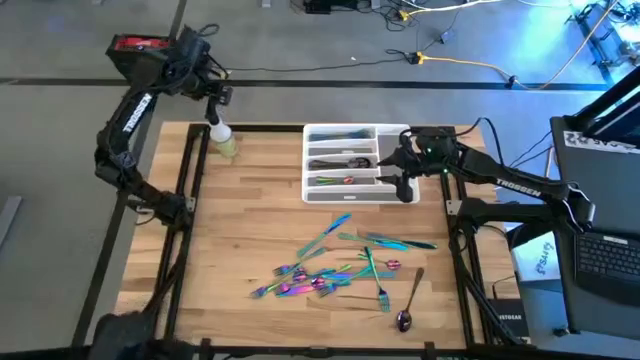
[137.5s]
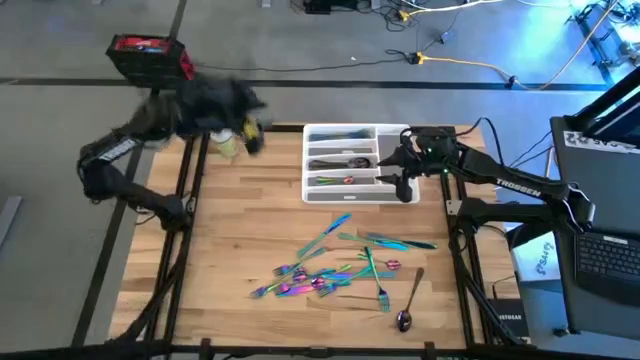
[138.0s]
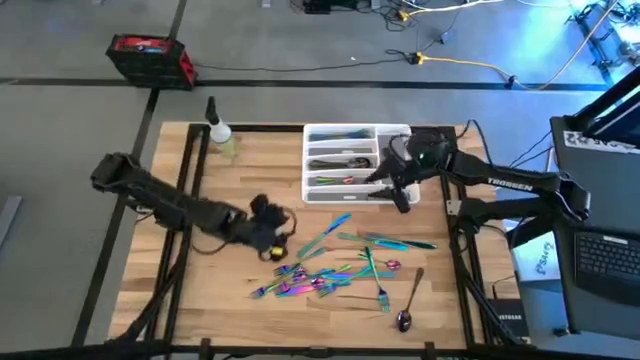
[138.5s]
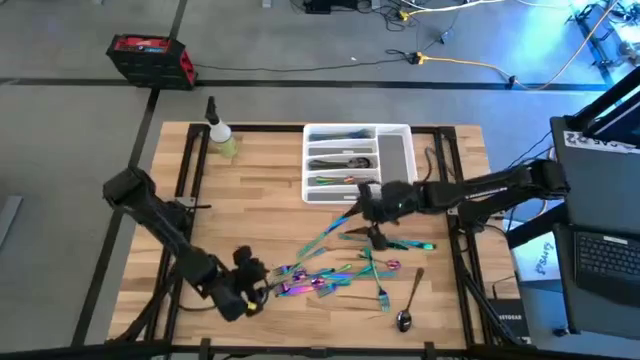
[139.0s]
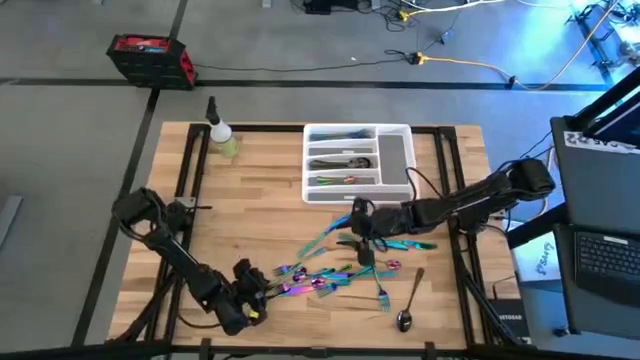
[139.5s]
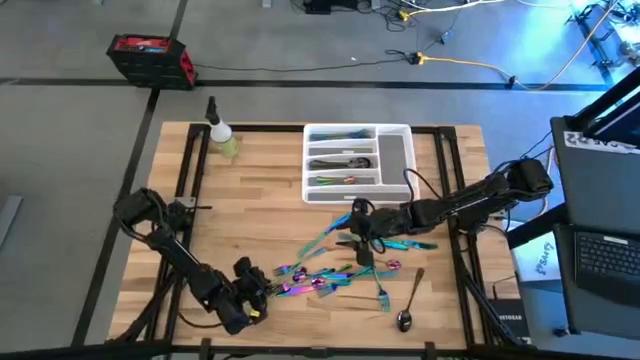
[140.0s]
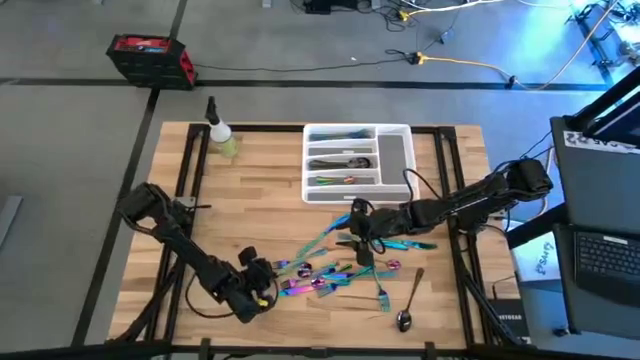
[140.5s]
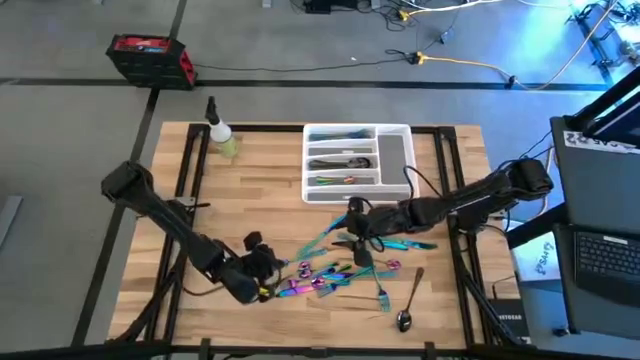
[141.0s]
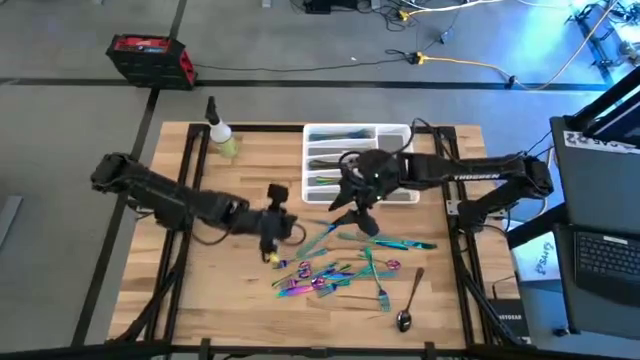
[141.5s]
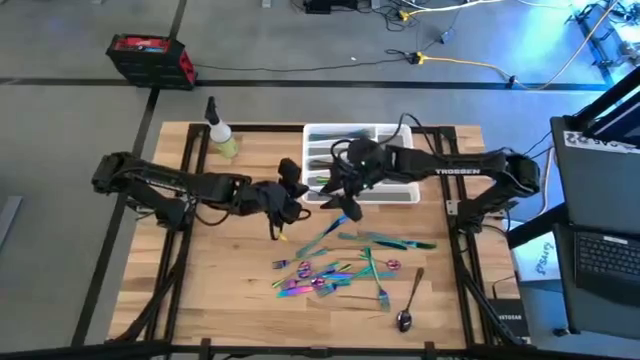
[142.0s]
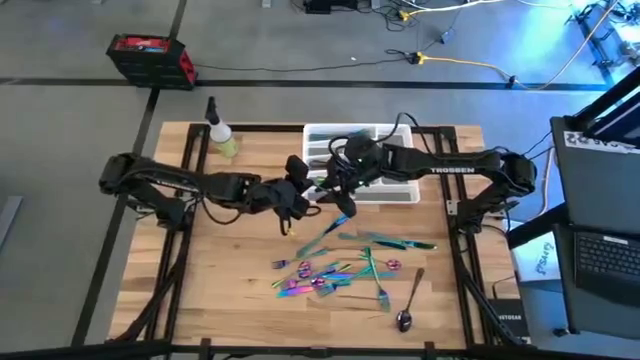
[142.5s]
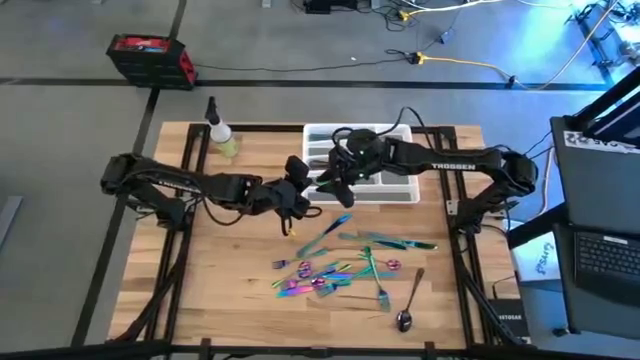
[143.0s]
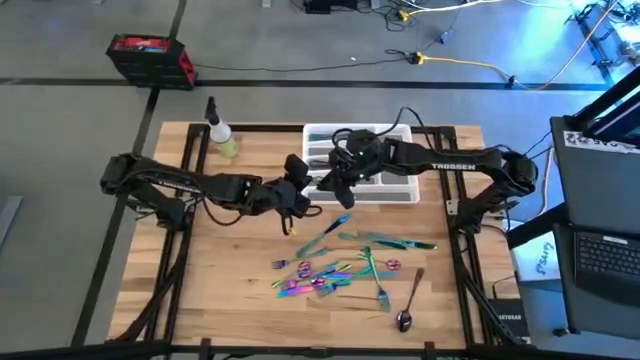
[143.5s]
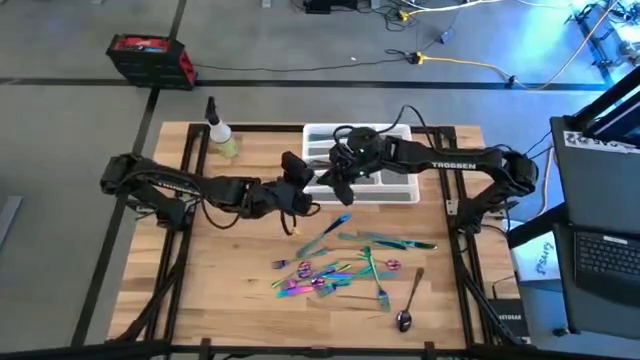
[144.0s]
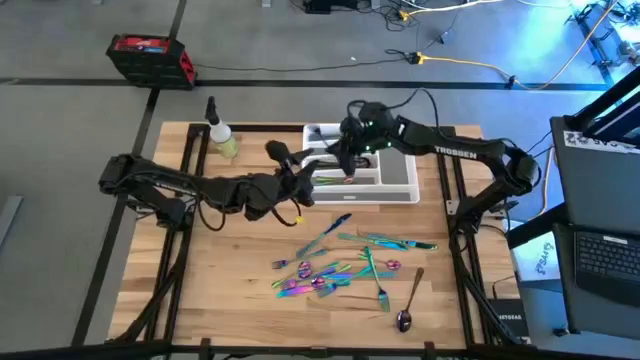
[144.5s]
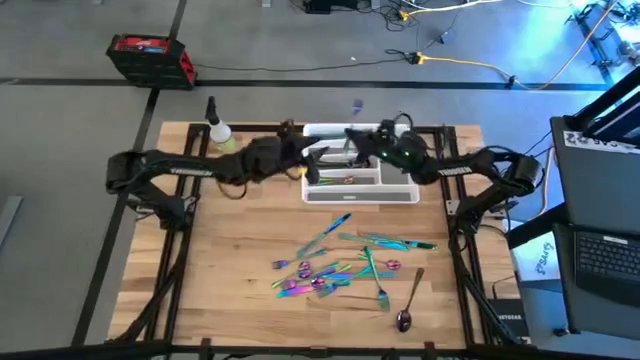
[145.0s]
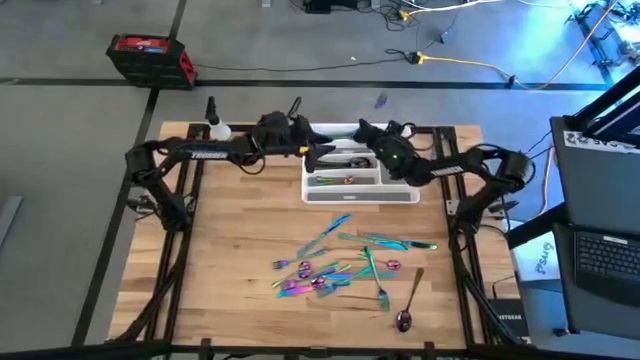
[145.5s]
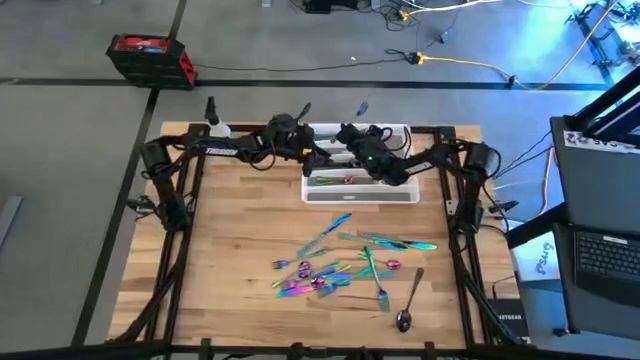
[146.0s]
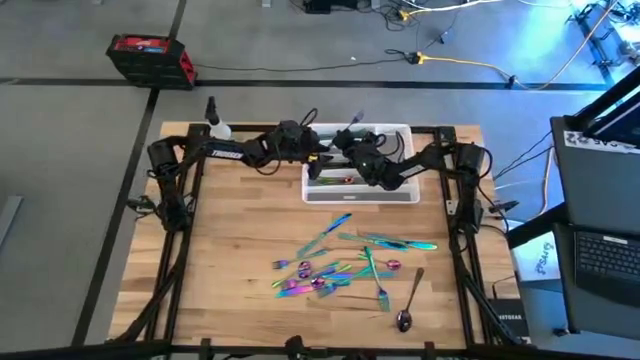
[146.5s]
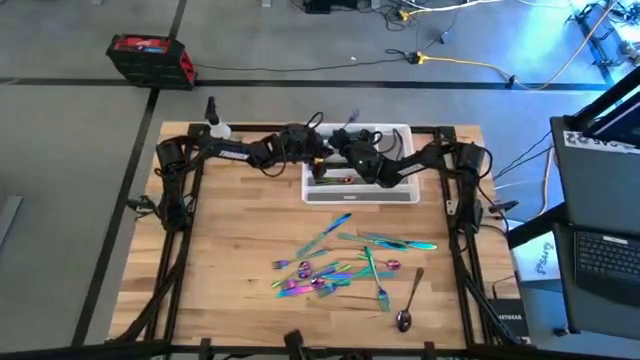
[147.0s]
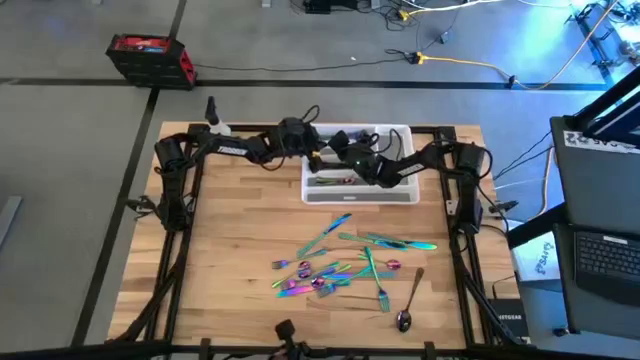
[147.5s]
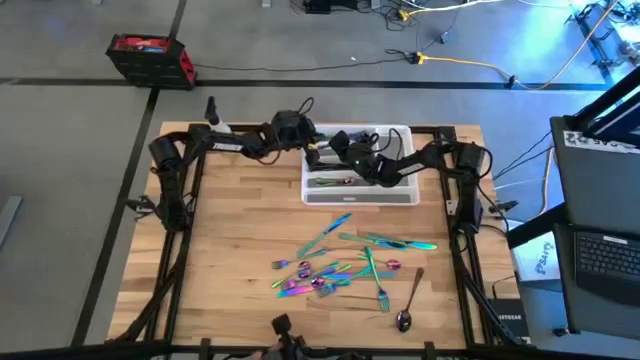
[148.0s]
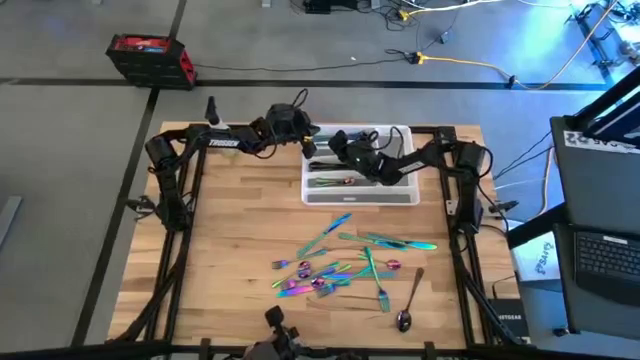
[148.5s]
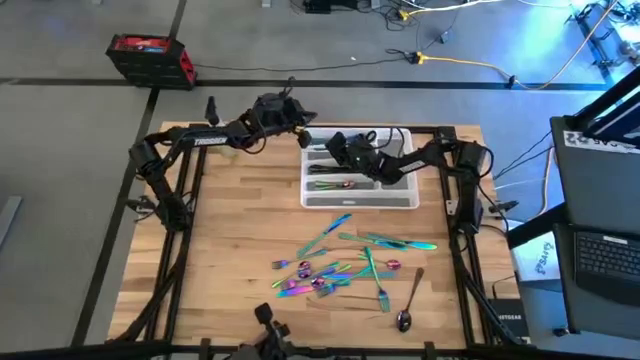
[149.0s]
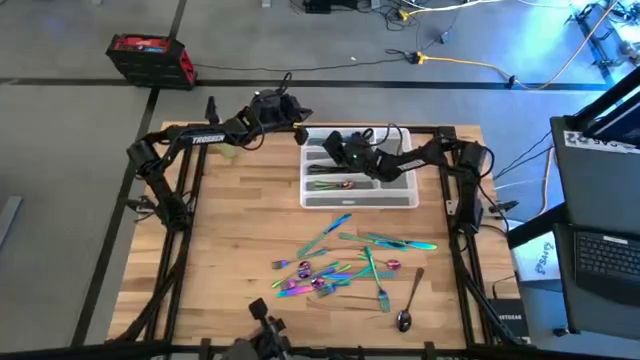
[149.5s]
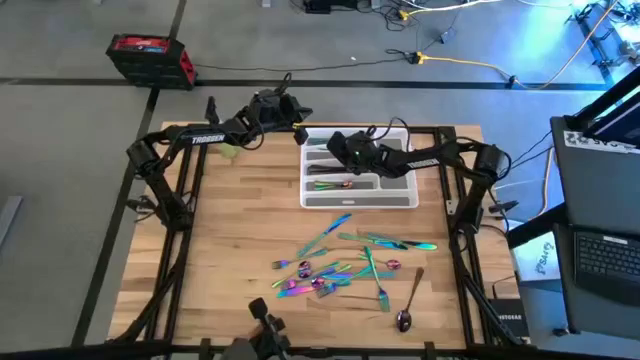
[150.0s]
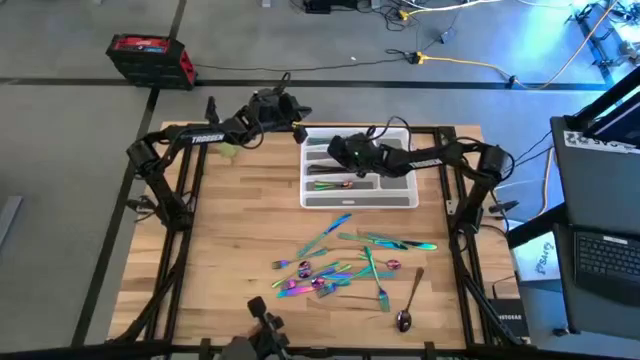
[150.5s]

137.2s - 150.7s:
Task: Sort silverware
Put the blue fork on the white silverware tray

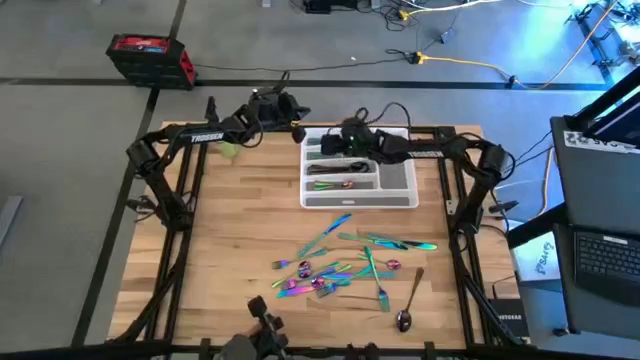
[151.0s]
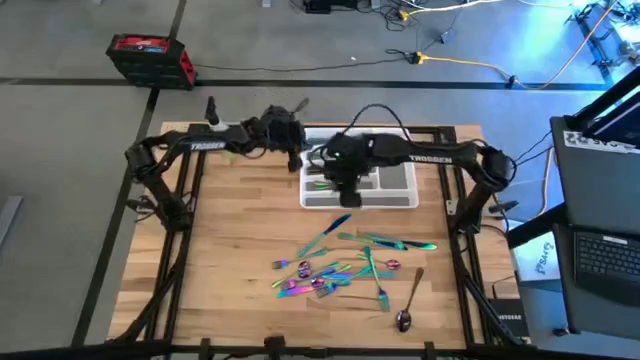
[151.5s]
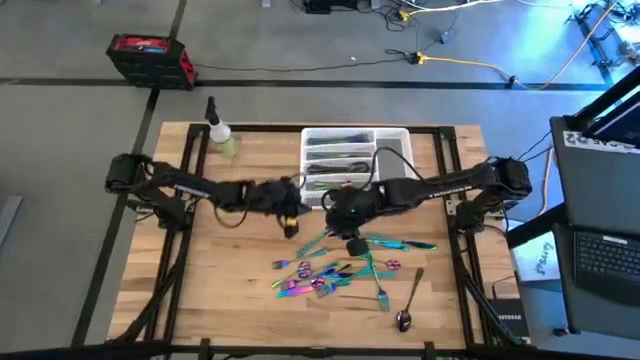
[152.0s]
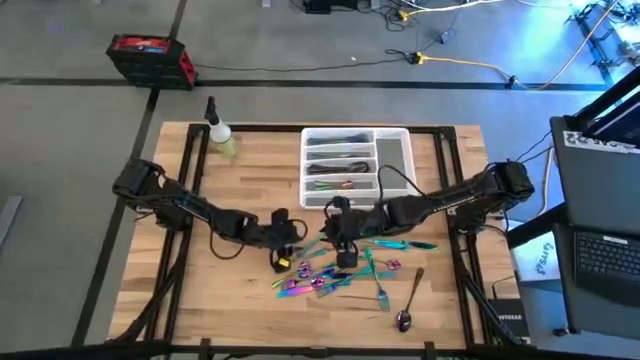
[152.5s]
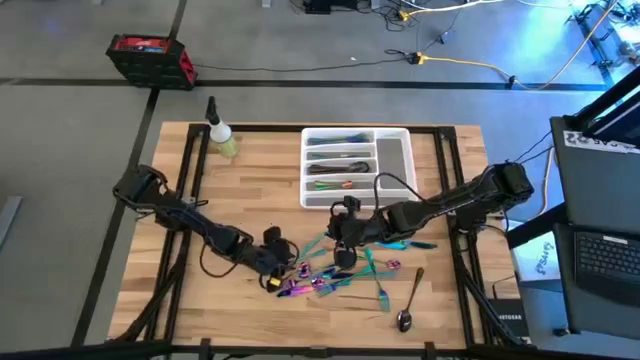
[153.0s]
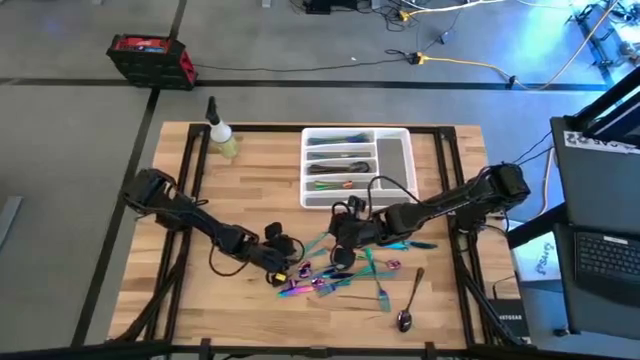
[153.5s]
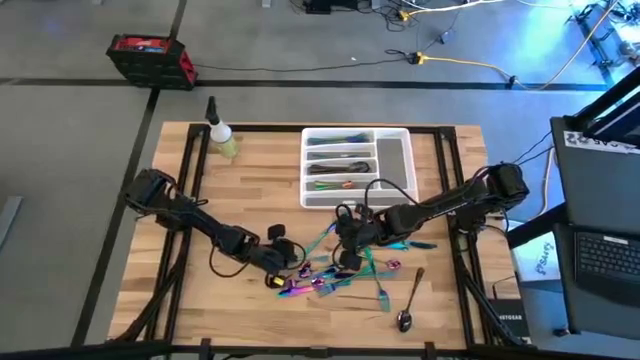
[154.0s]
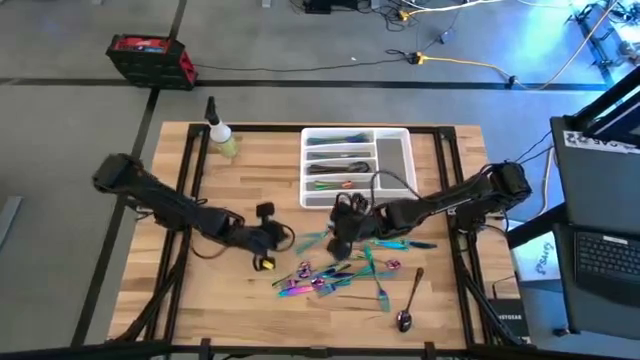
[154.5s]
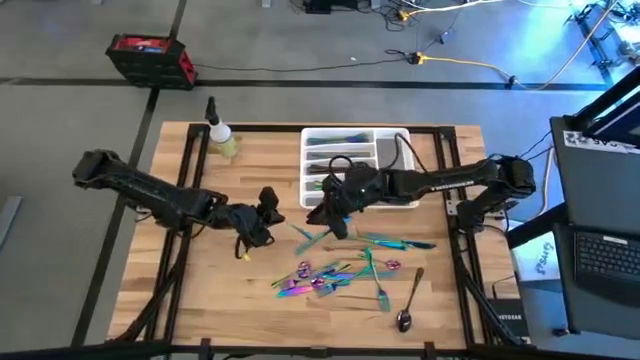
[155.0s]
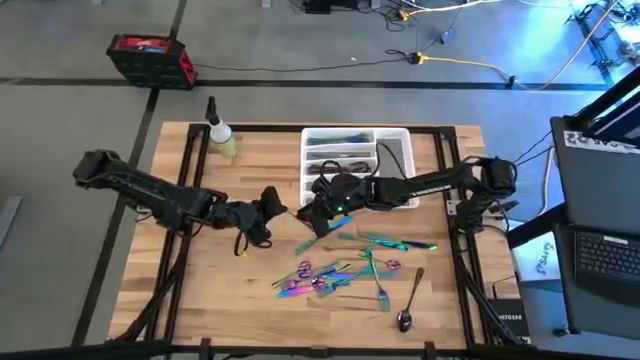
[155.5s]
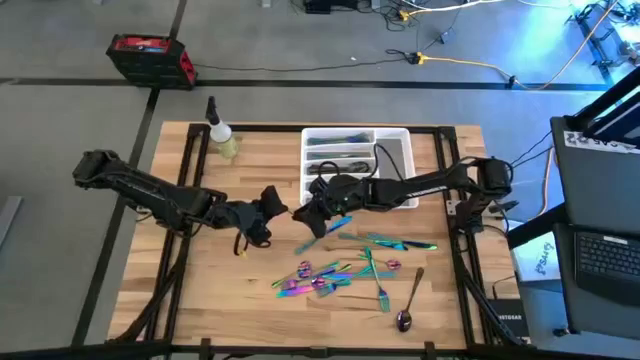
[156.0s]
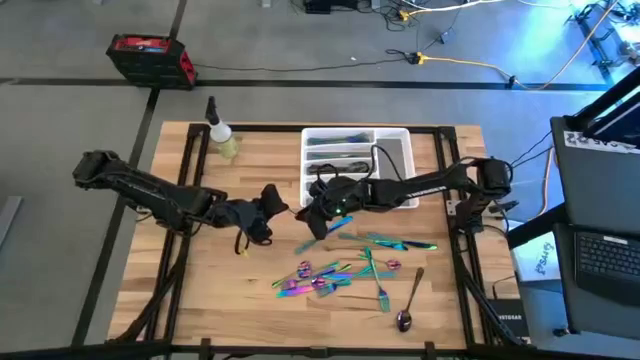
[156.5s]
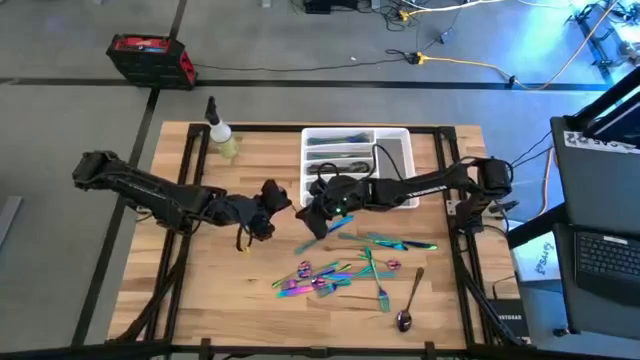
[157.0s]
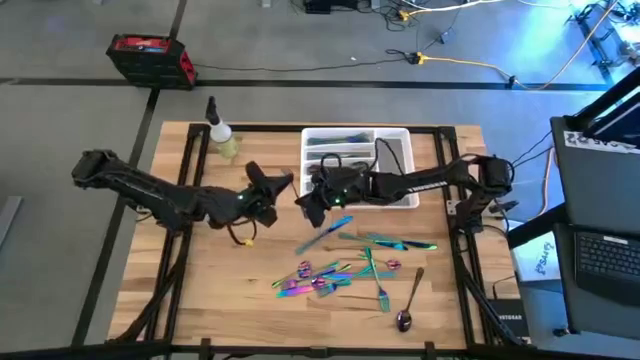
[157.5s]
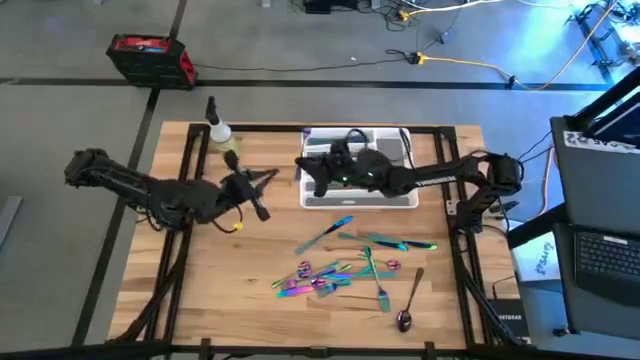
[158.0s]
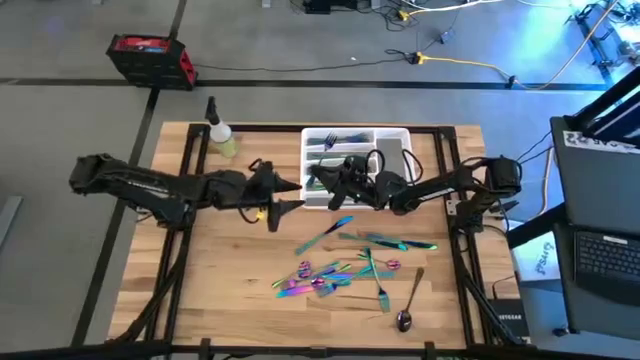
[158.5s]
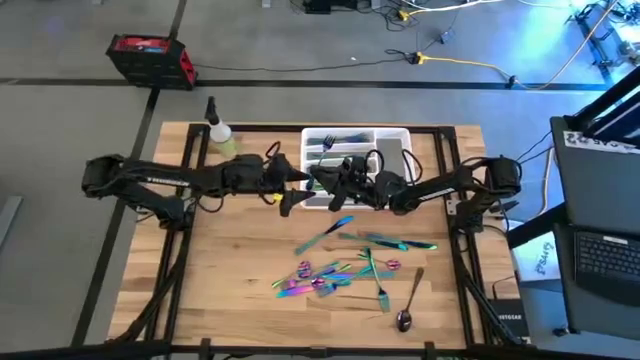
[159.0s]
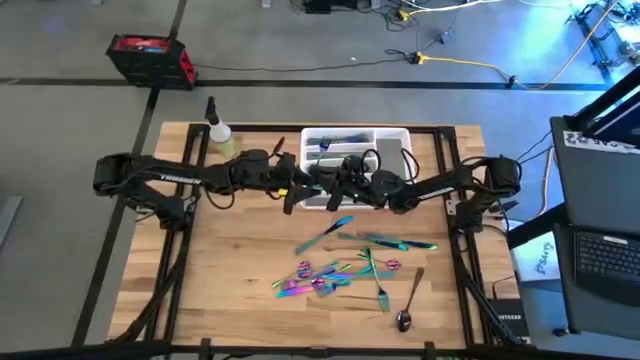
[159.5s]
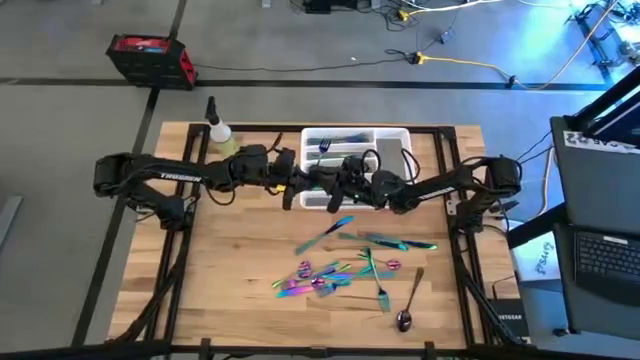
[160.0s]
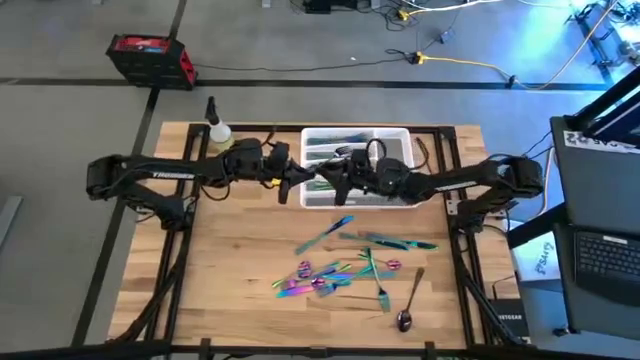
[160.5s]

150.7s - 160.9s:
Put the blue fork on the white silverware tray
